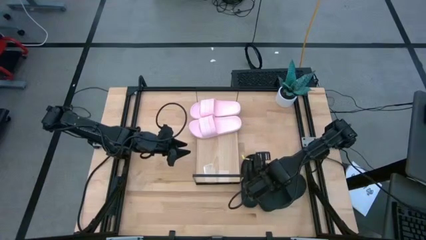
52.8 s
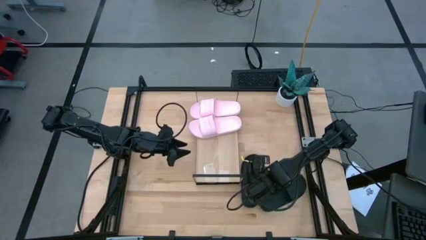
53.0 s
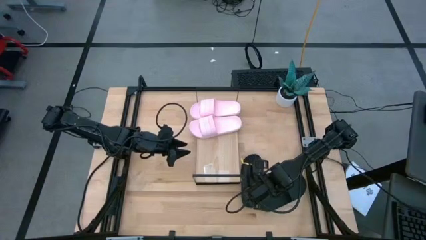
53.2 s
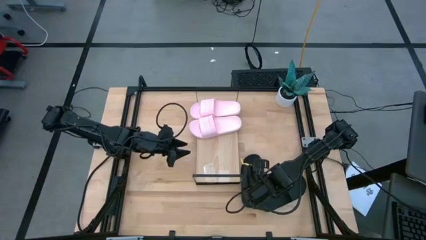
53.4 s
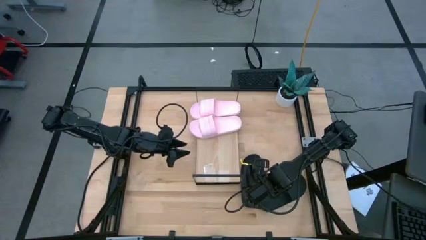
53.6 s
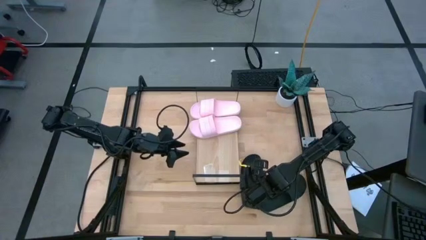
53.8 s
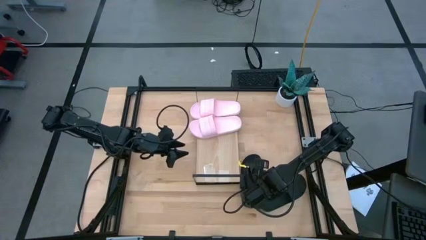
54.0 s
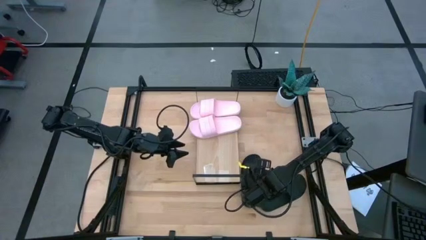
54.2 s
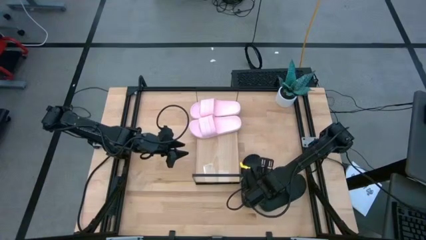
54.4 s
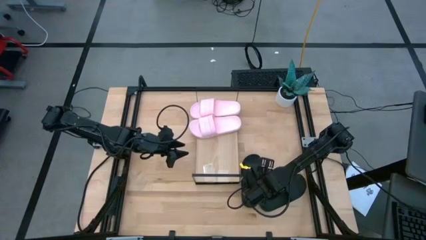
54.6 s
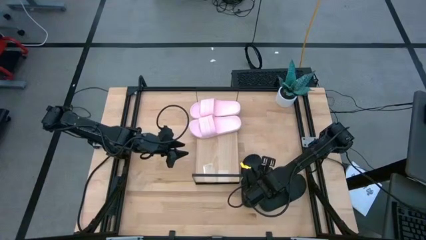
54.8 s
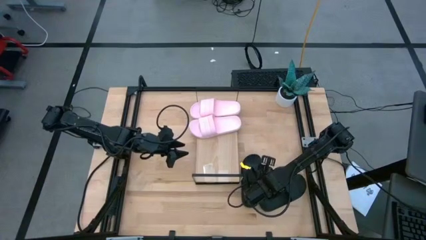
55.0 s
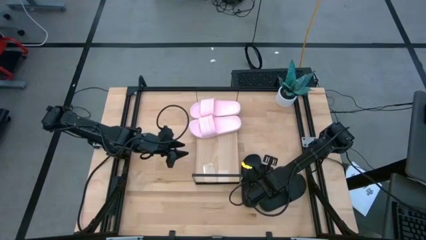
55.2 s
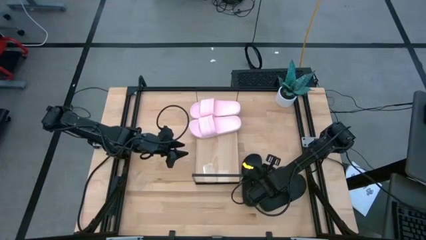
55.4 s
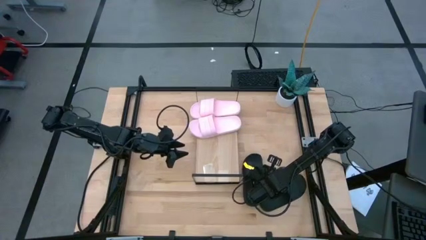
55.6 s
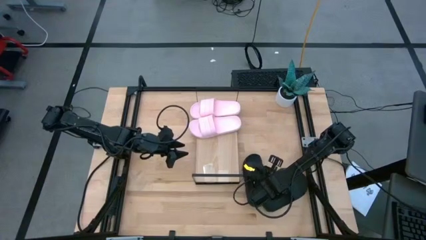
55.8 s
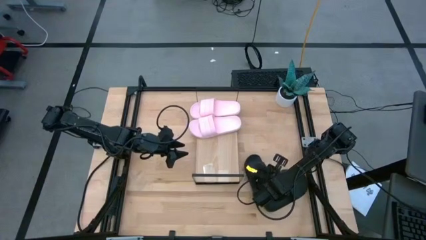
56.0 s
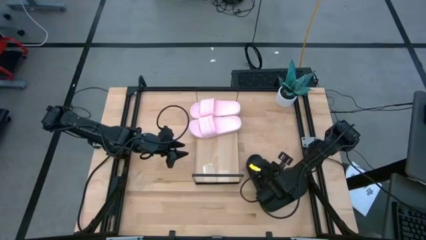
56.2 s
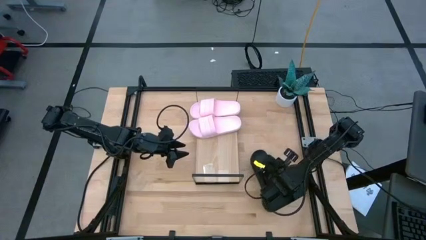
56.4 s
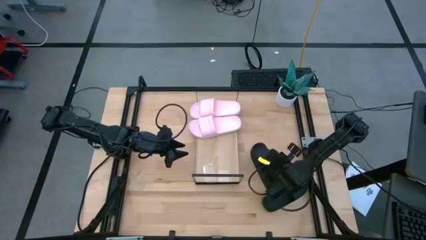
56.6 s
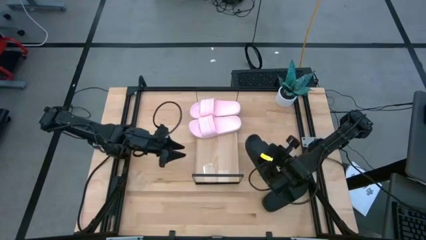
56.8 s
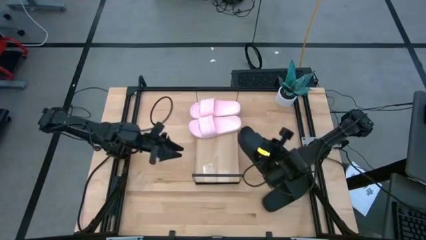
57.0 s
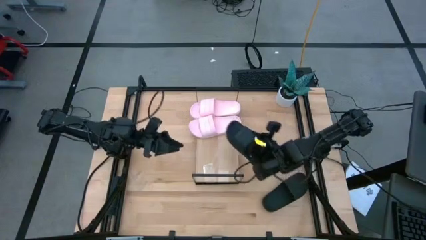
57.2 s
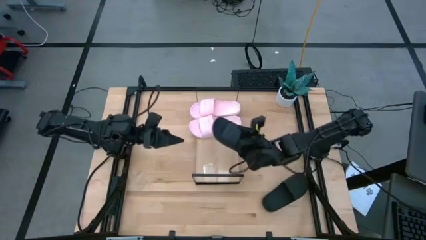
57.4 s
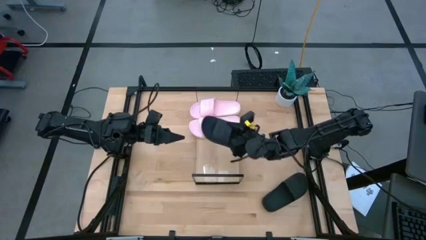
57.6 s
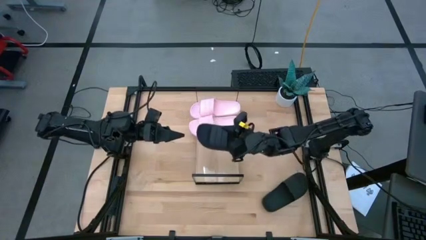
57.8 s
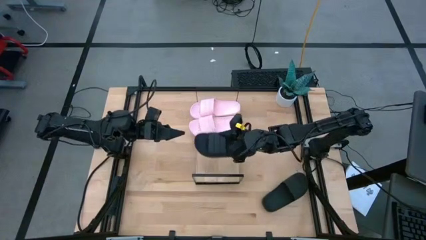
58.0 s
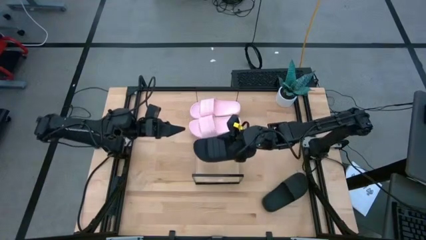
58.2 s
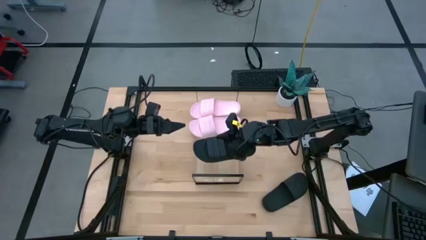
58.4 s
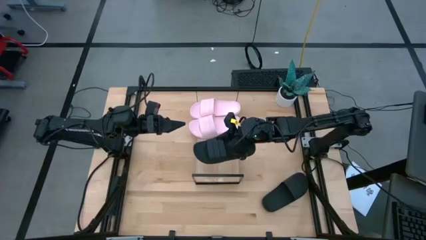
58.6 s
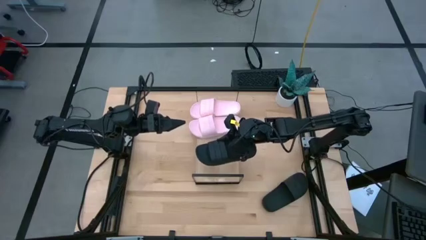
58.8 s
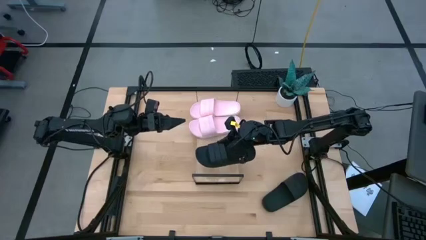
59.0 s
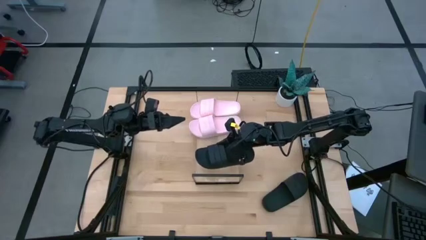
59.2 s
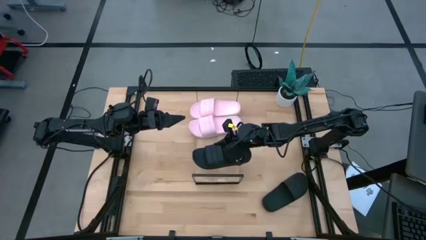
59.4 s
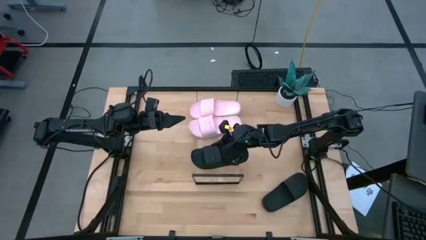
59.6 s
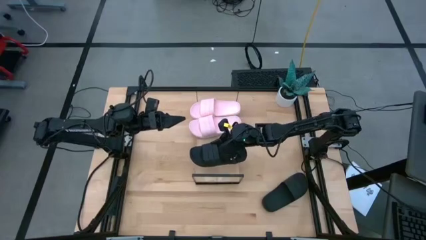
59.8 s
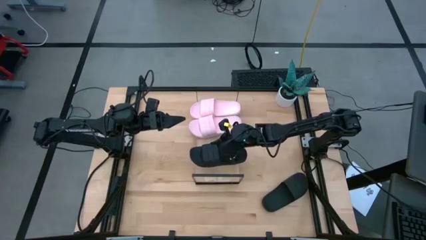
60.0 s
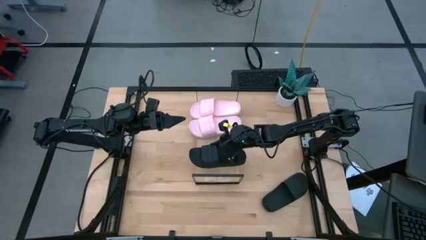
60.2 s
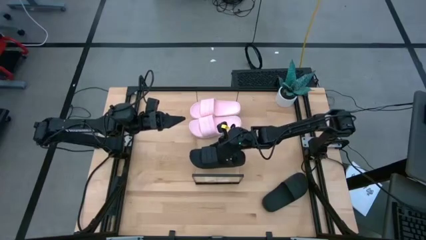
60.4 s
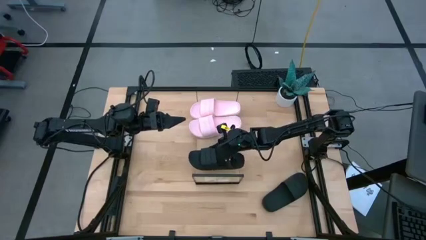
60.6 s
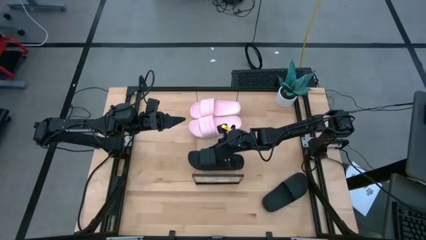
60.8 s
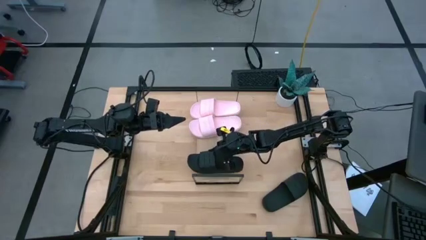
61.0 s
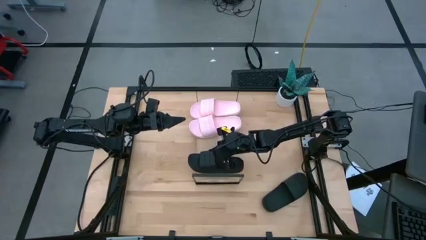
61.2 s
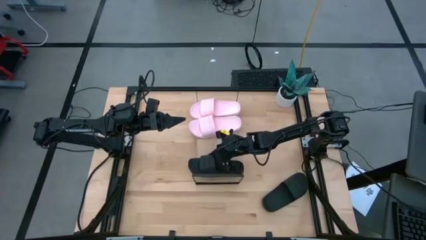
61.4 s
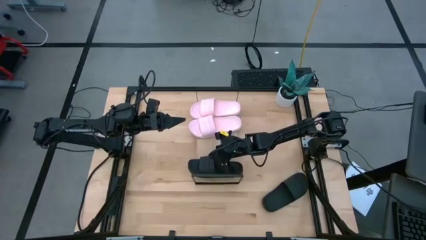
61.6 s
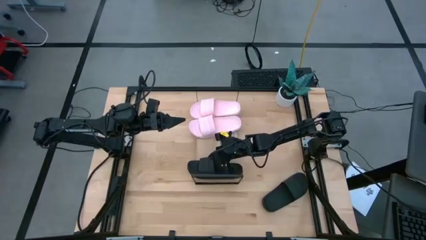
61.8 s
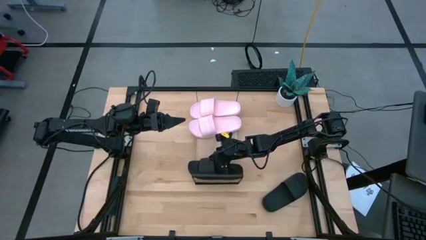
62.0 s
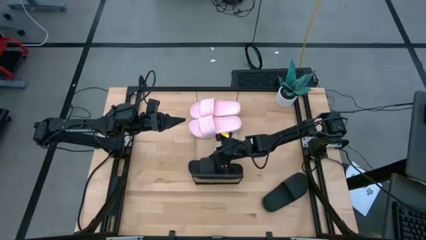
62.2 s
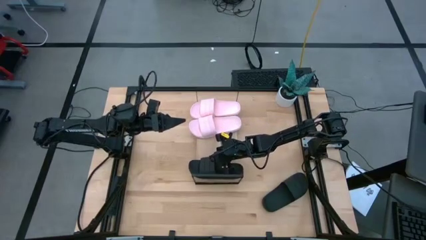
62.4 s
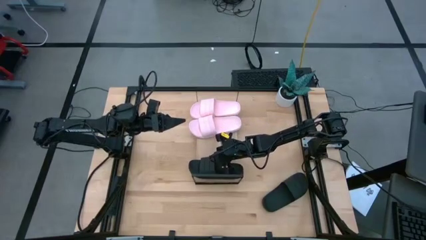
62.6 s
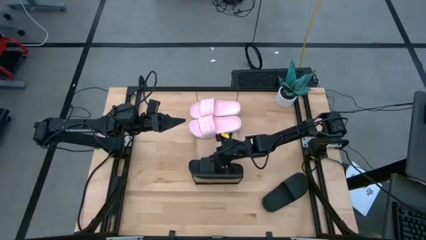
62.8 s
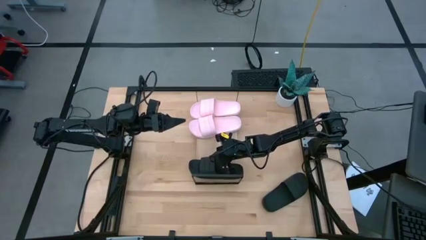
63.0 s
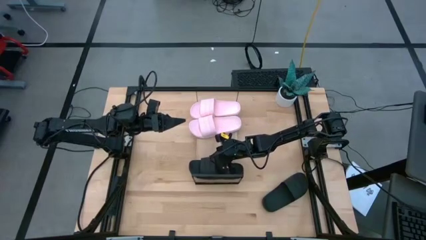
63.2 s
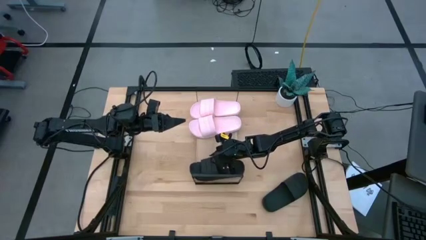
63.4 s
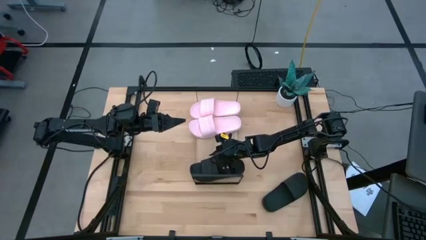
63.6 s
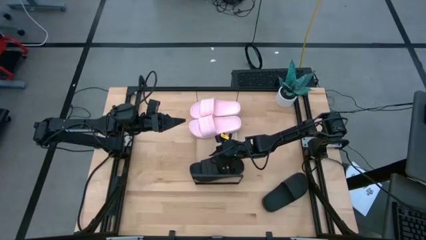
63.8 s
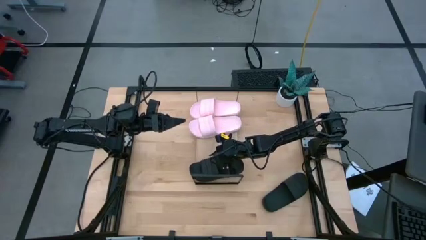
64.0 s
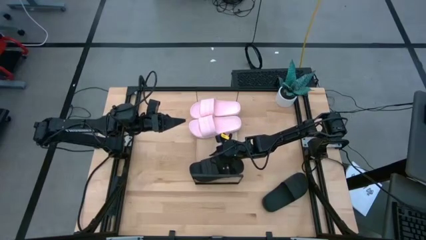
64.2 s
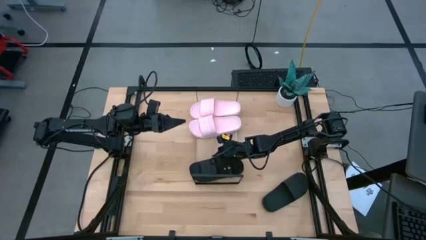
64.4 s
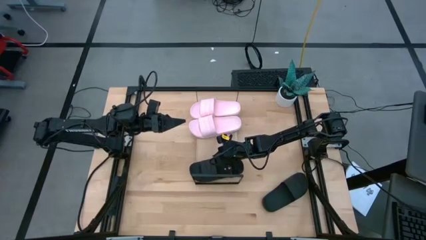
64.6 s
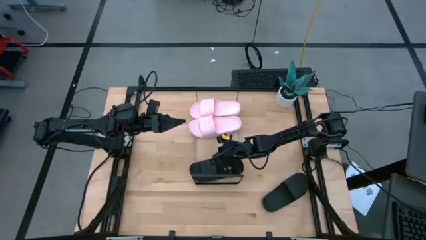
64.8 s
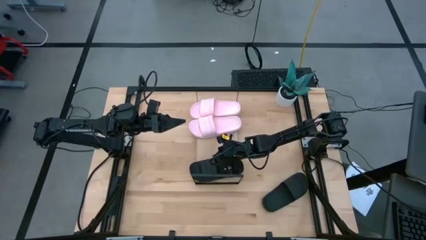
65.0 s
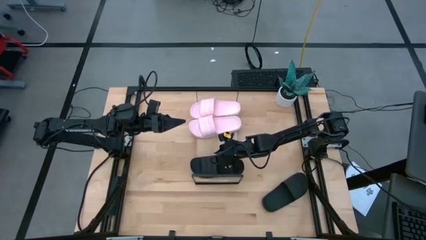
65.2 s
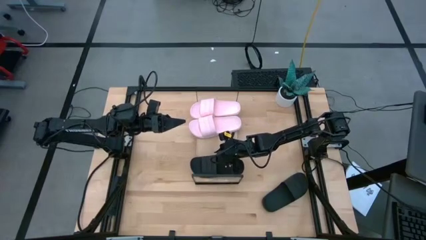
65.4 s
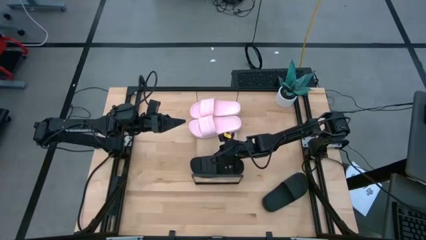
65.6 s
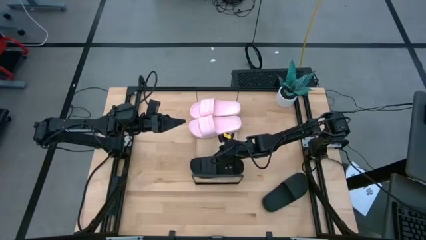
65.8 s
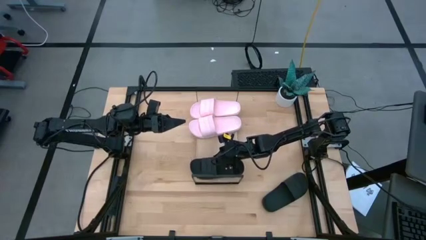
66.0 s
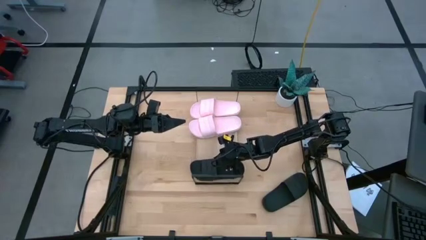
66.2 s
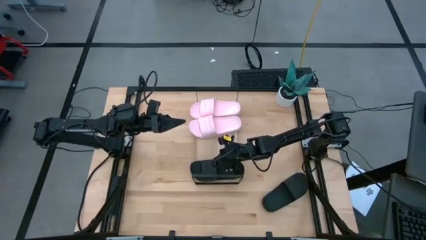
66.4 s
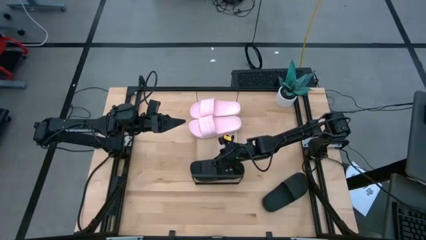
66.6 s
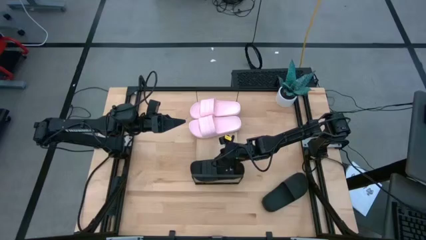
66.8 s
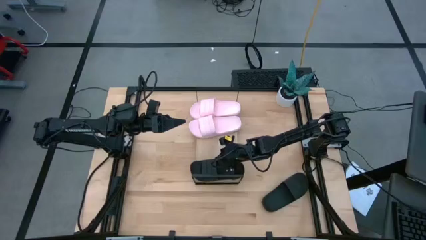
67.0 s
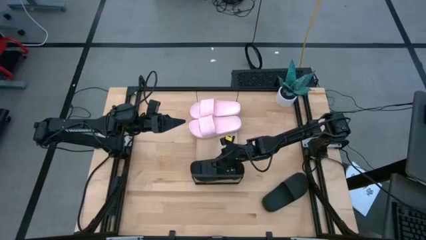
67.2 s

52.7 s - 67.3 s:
Task: Pick and place slides into the shelf
Put the left black slide on the shelf
